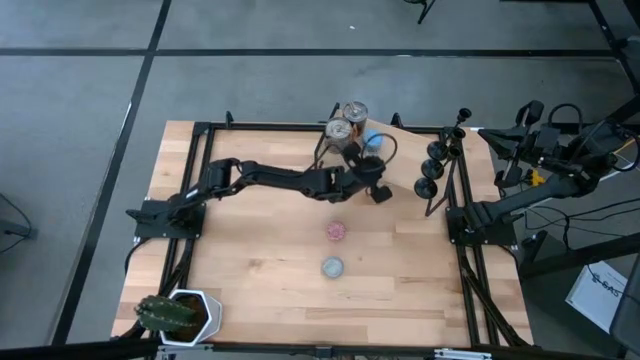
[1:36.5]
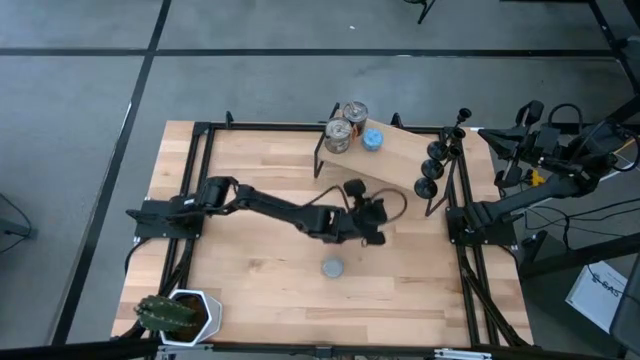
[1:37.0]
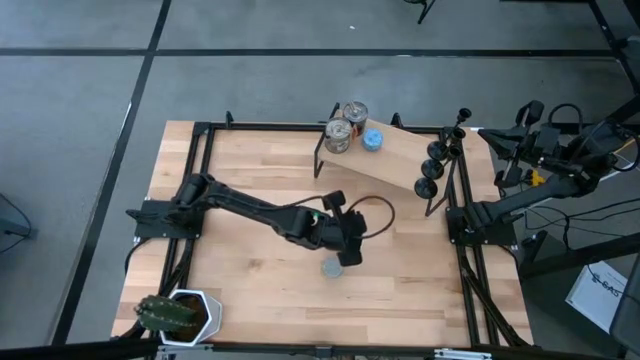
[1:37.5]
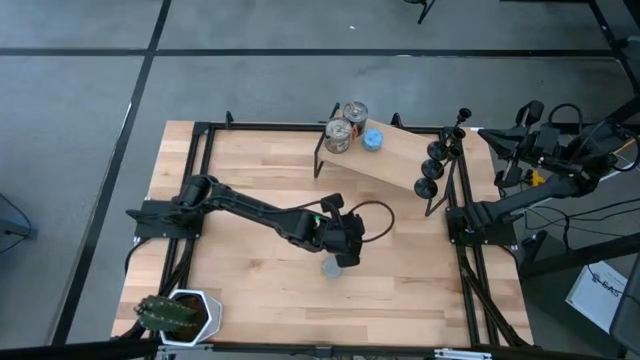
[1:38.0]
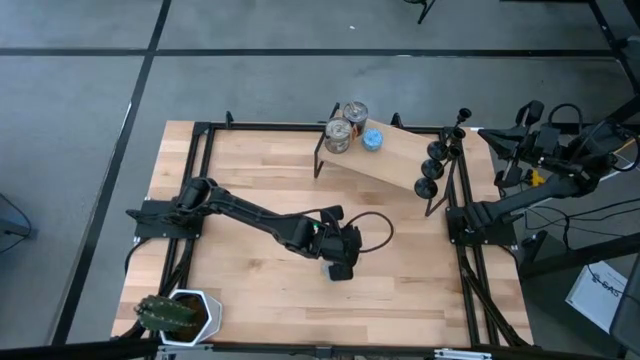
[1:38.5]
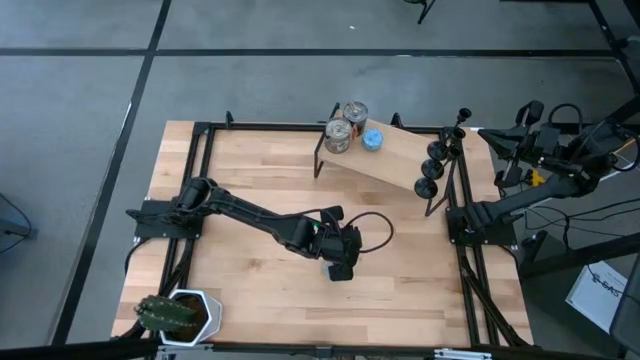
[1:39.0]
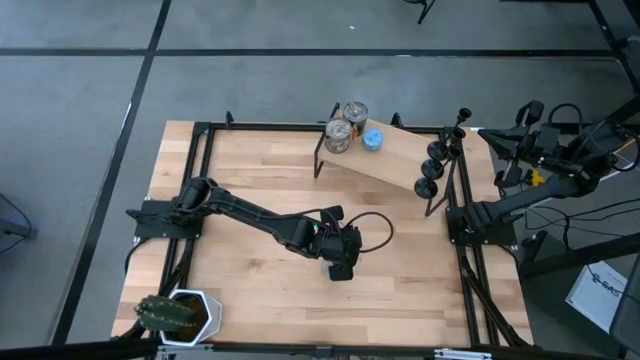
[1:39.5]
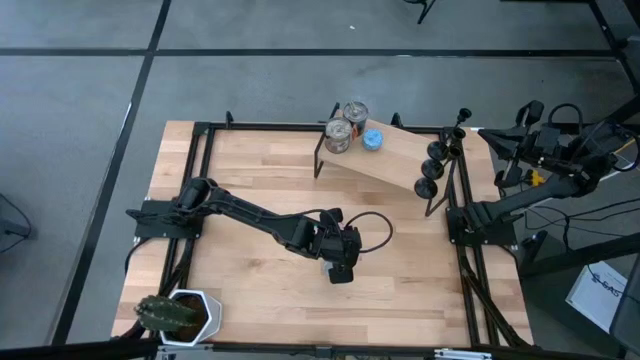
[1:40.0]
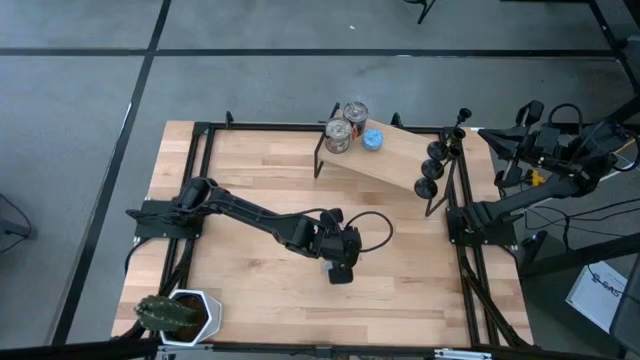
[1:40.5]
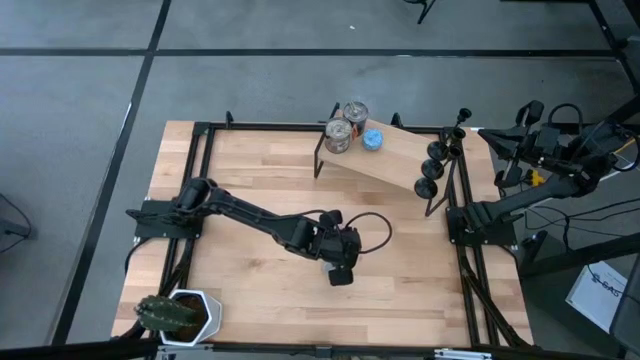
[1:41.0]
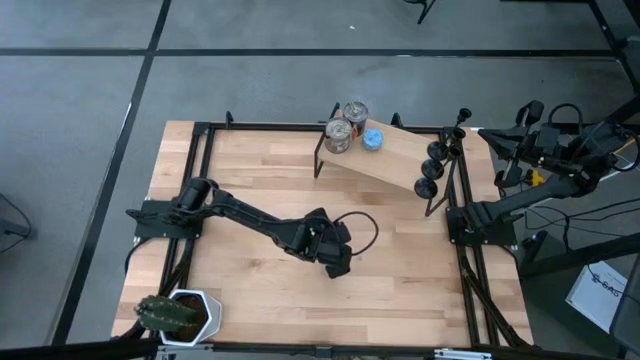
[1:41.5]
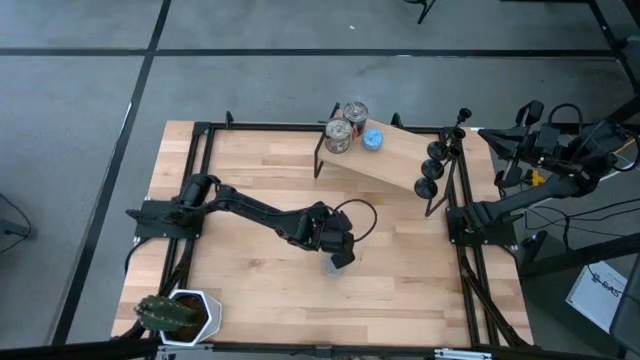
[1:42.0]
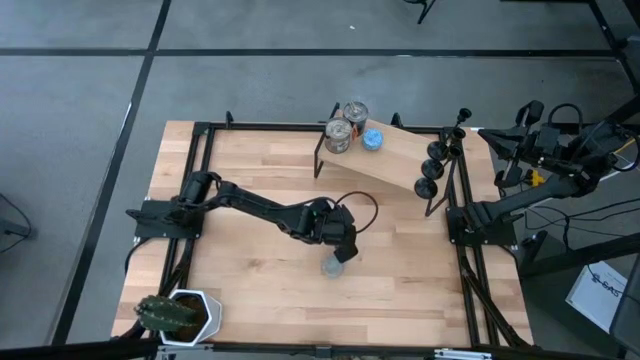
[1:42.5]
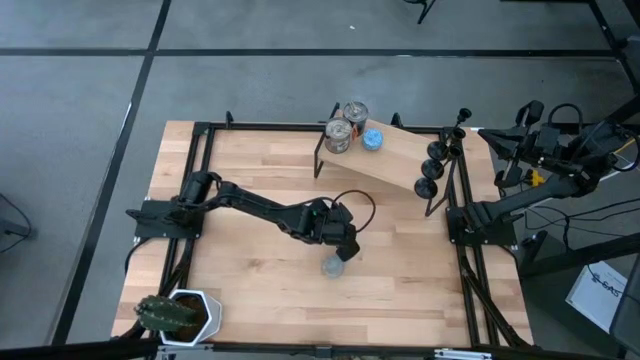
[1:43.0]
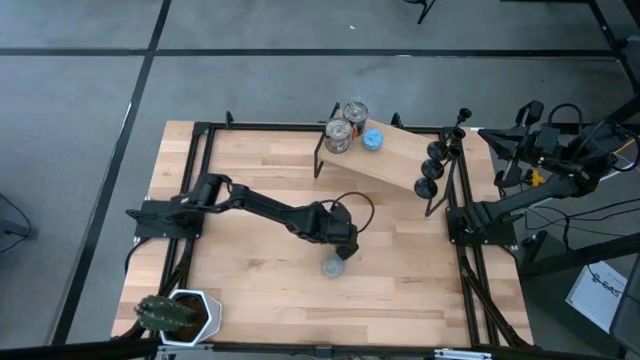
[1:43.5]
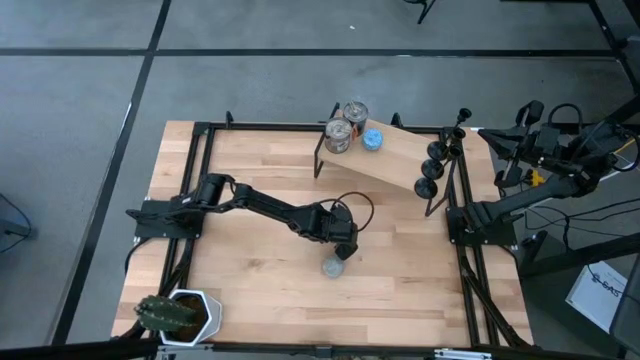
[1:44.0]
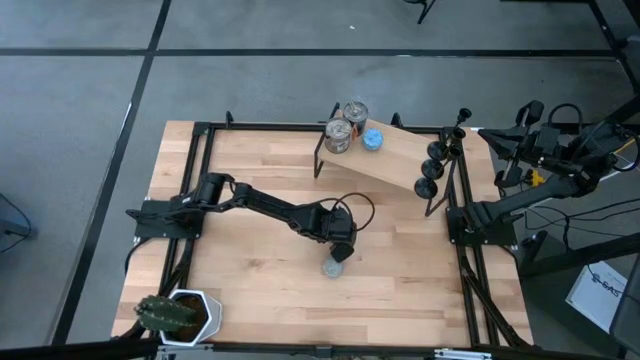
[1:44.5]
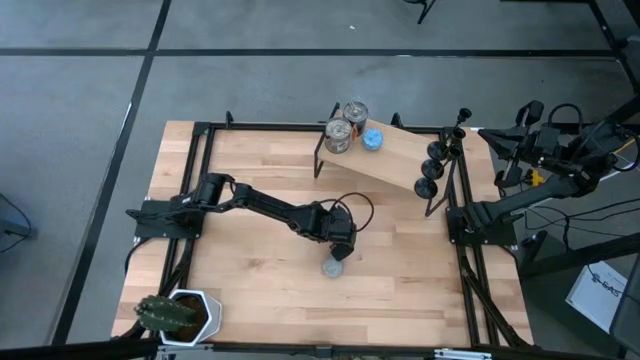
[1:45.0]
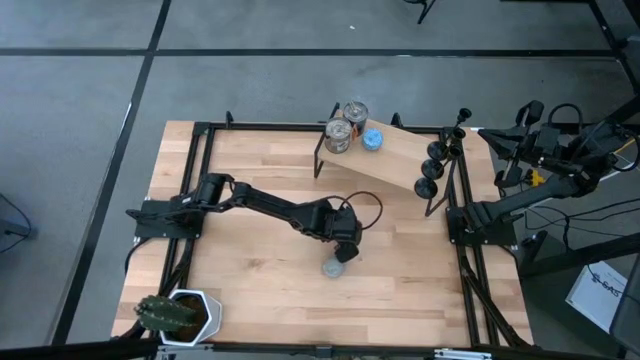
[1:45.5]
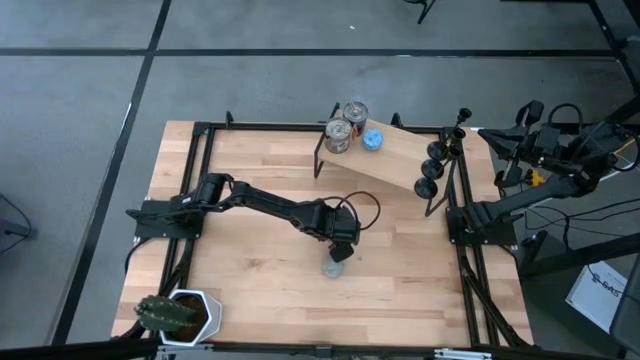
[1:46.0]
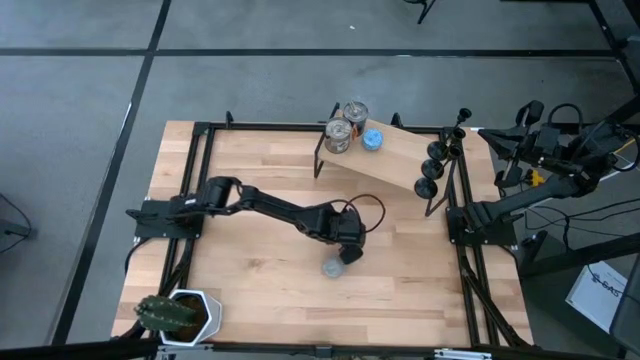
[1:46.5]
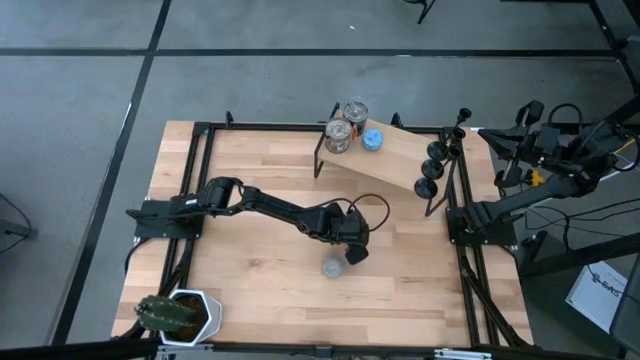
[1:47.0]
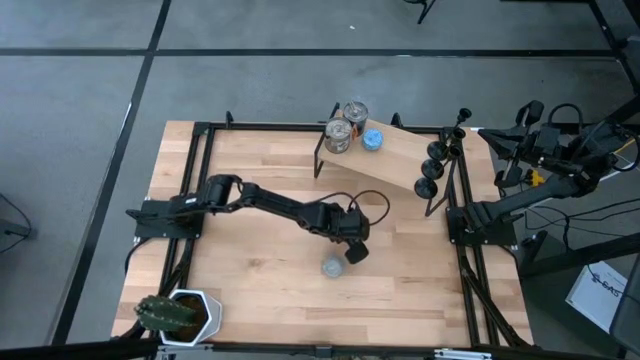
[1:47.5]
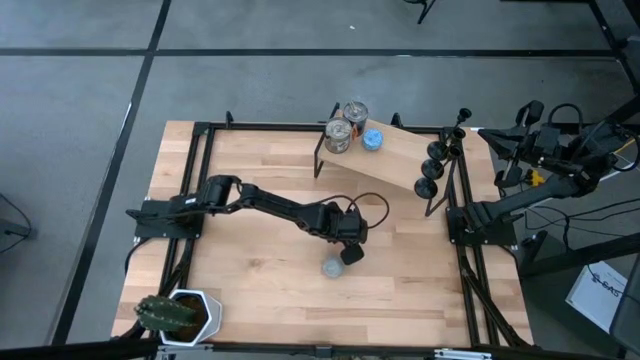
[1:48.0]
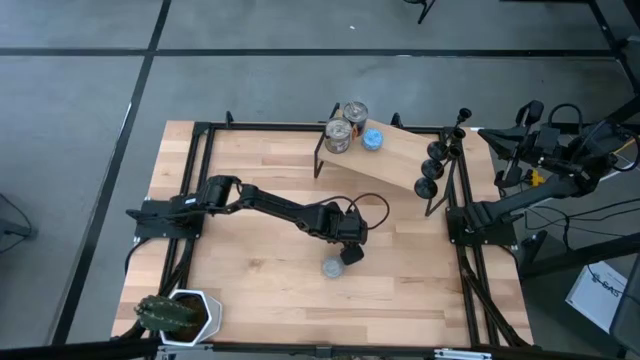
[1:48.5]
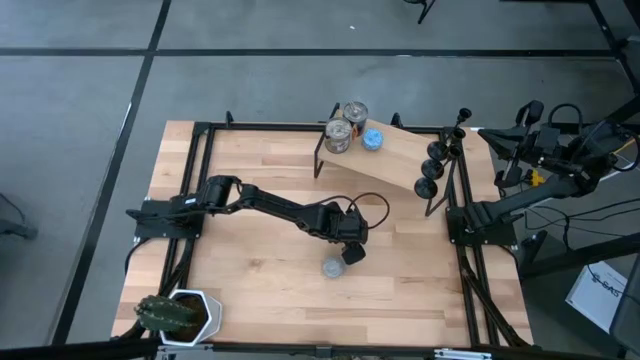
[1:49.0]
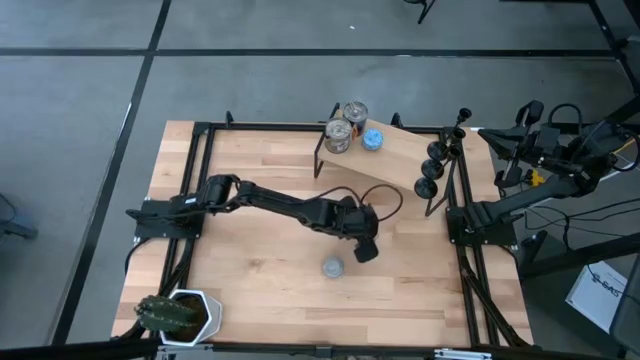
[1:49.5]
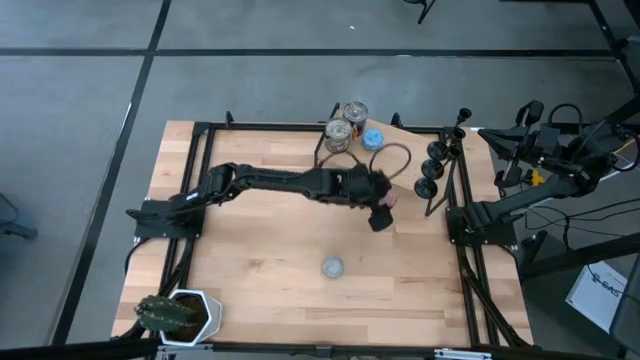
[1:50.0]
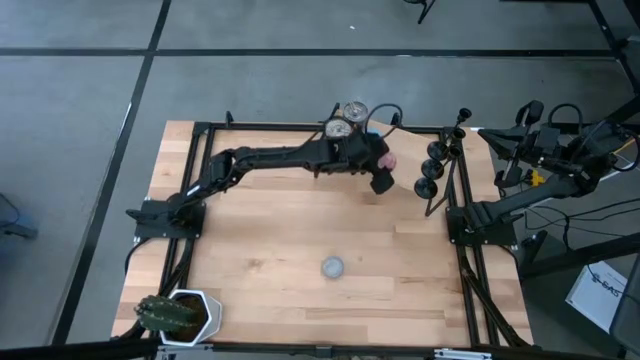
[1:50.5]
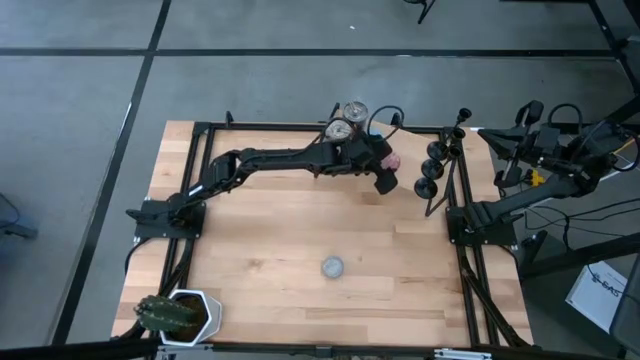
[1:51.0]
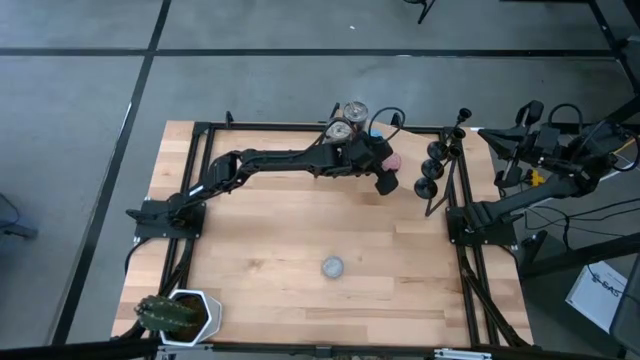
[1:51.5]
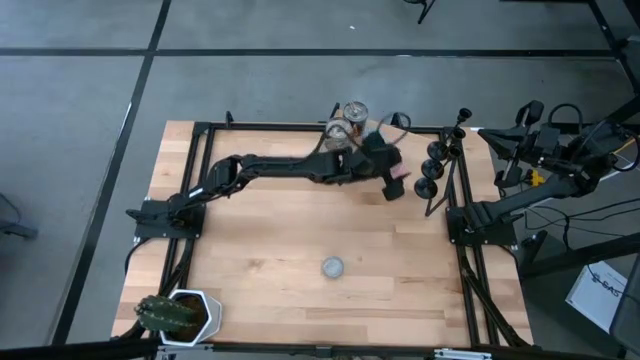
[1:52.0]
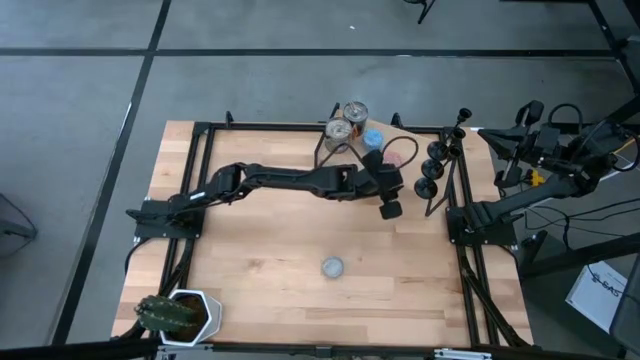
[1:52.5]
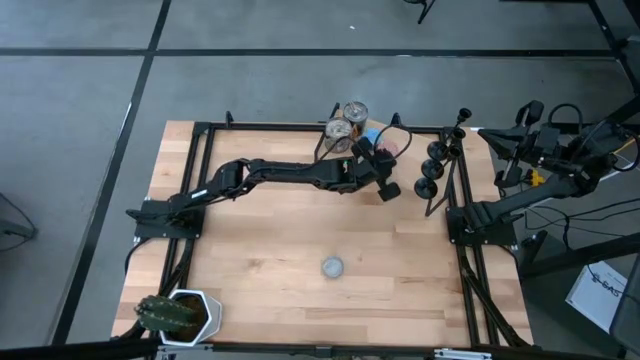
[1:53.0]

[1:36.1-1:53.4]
Task: Pick & Place candle stick holders
Put the red patterned scented candle on the shelf

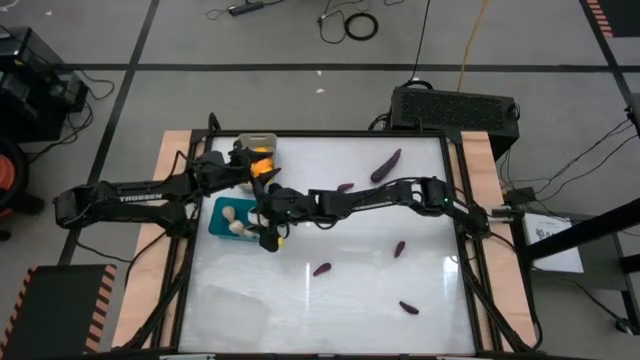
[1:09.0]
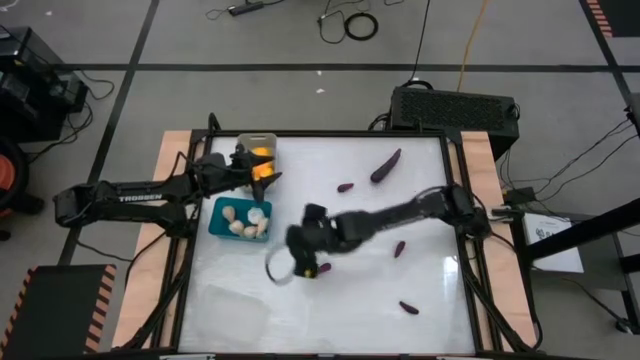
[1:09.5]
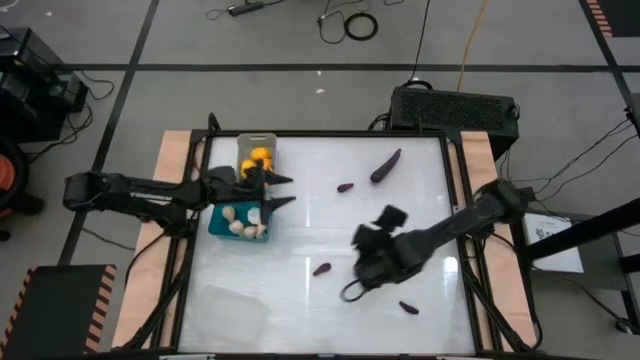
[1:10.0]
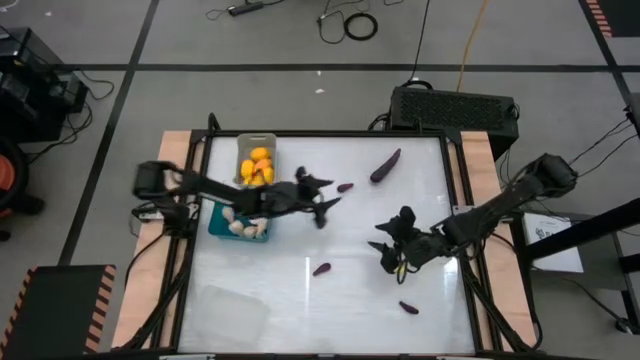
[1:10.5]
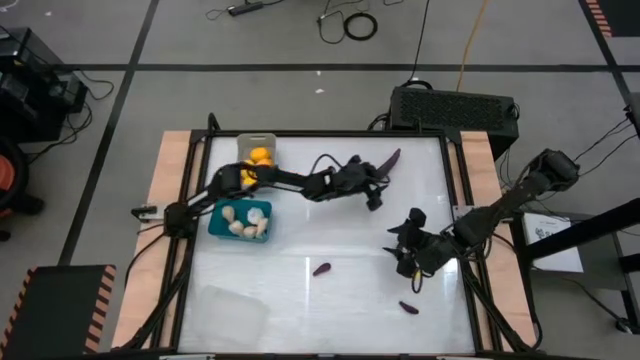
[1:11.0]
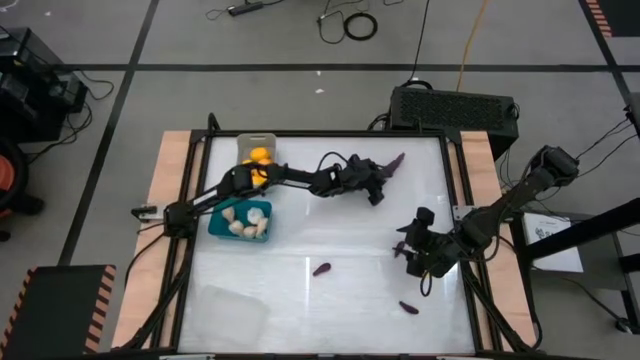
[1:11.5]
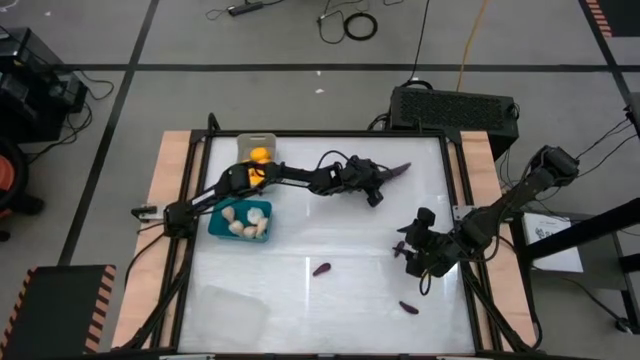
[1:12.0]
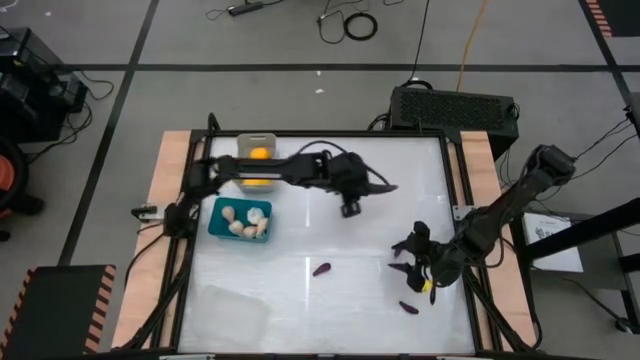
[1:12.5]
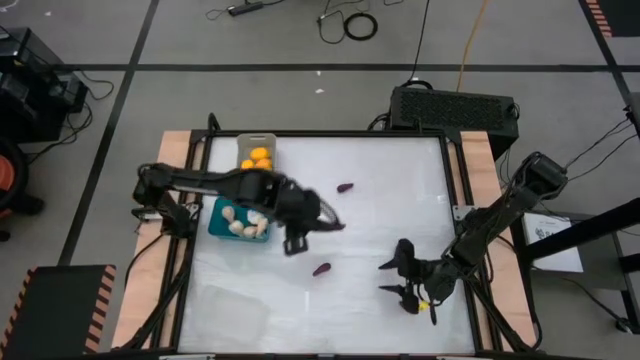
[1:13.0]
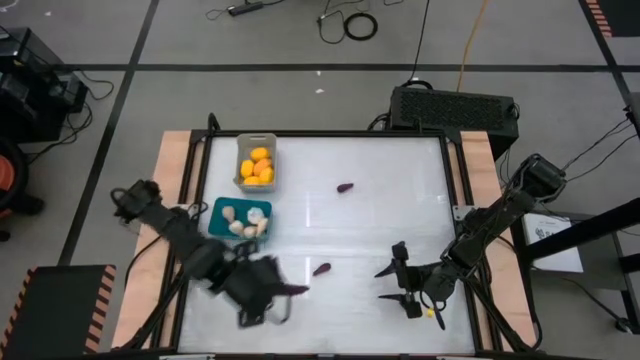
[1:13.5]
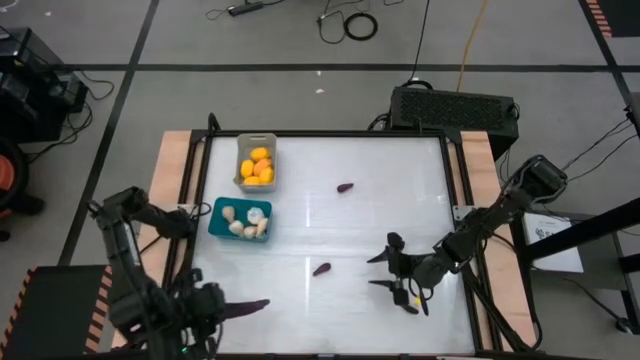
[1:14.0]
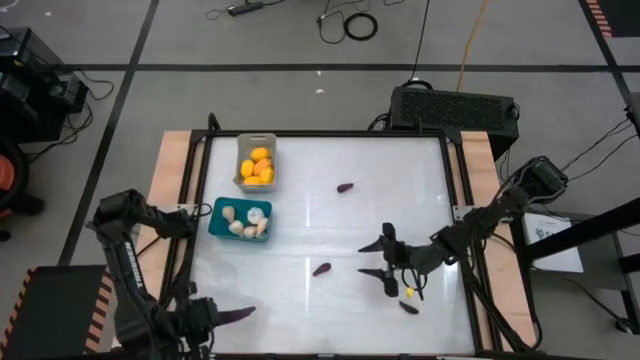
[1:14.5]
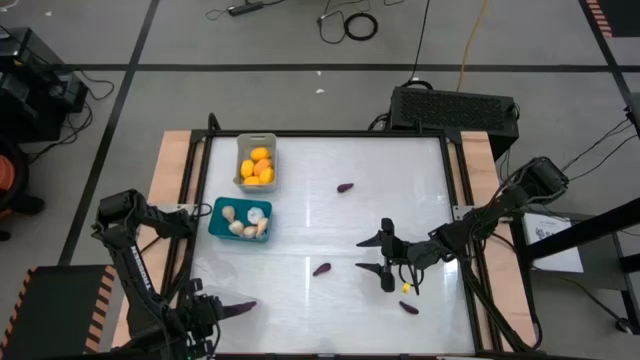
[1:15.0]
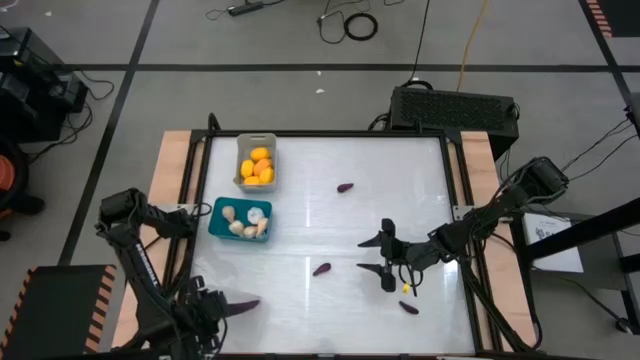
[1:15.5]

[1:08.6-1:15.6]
Task: Sort produce into baskets
Put the purple eggplant into the transparent bin
